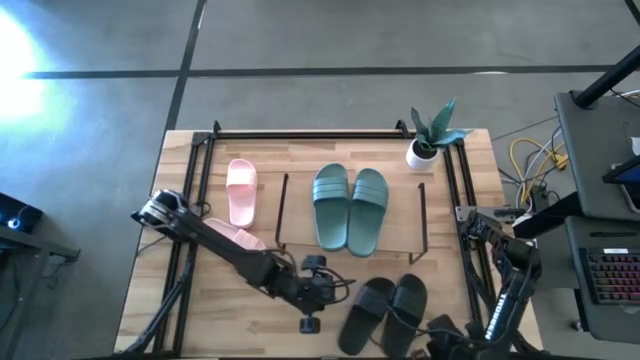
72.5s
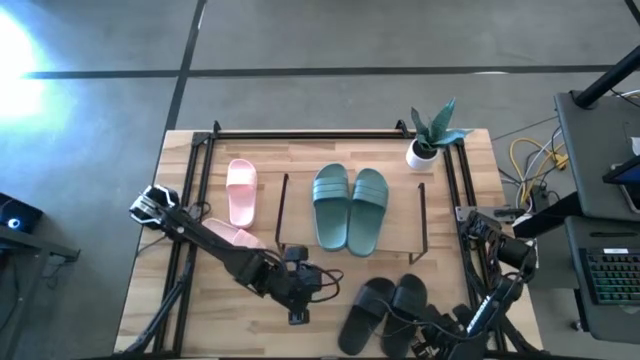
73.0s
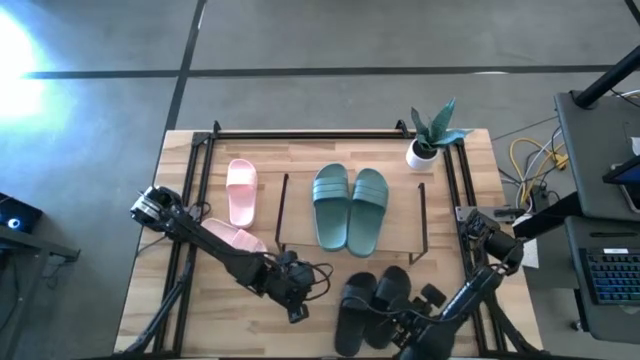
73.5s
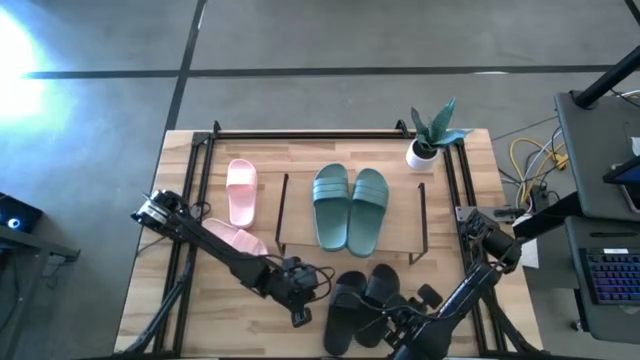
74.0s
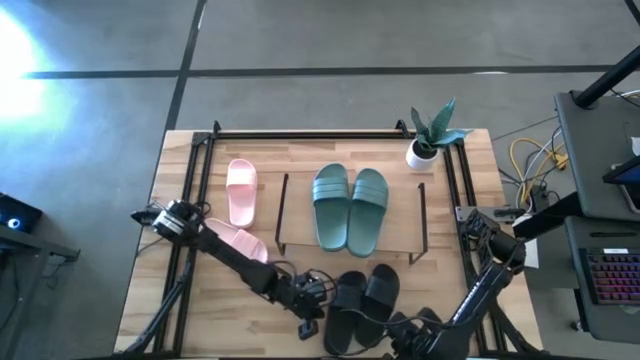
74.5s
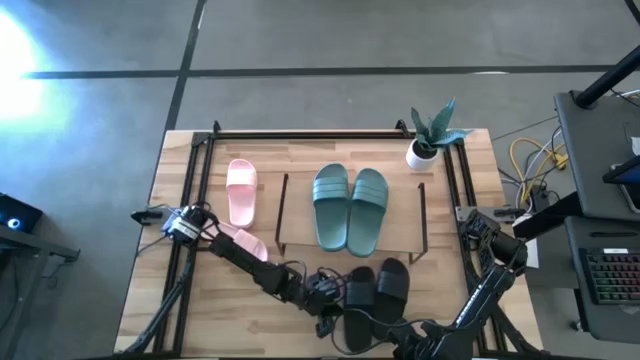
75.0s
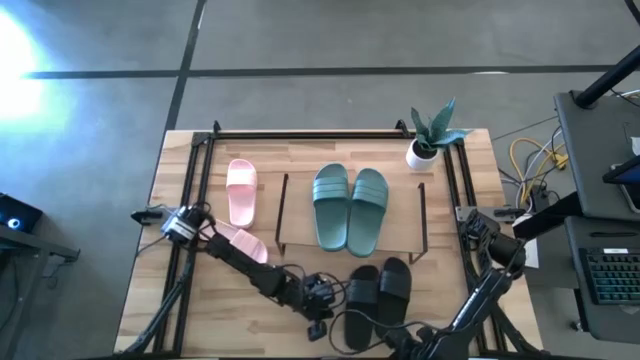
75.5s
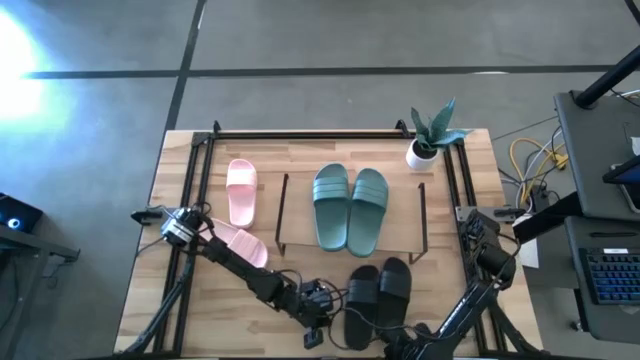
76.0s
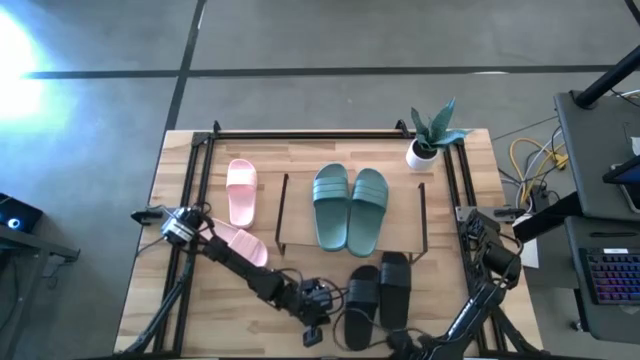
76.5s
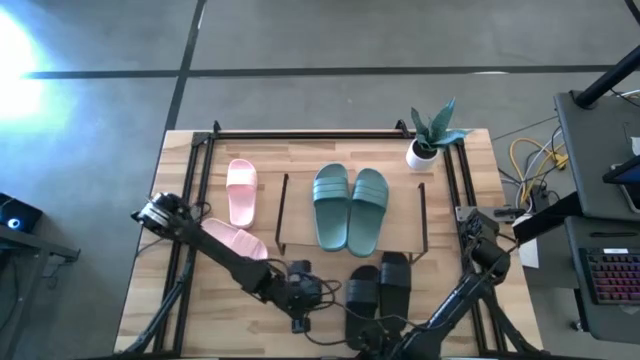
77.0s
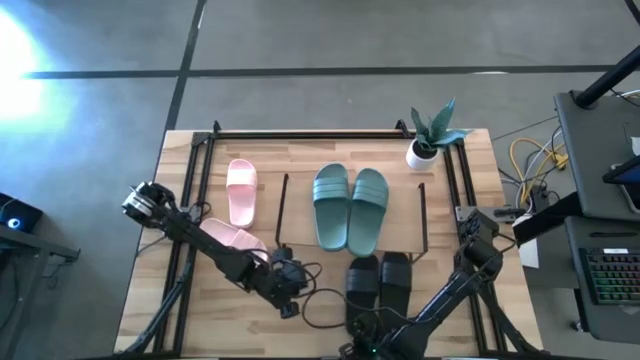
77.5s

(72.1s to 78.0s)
Task: Pick and place slides into the shelf
Adjust the black slides under the shelf

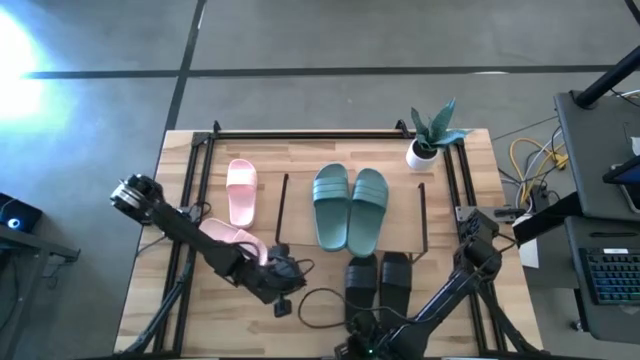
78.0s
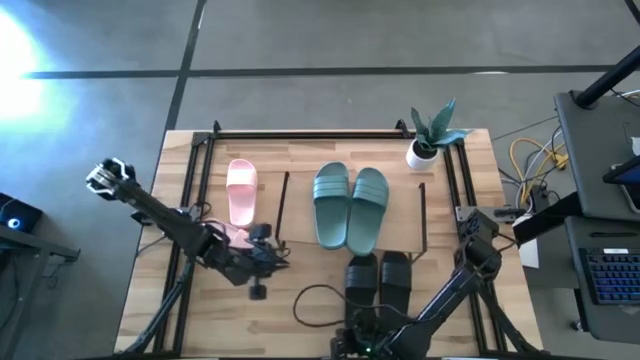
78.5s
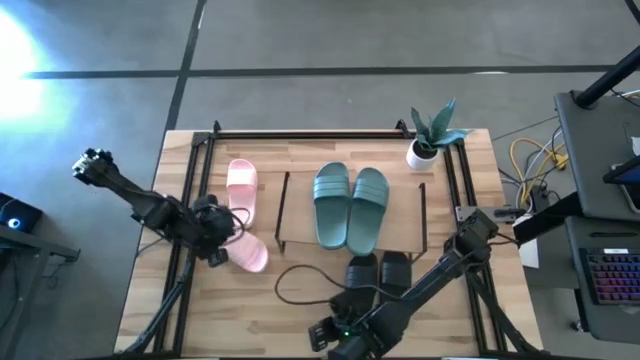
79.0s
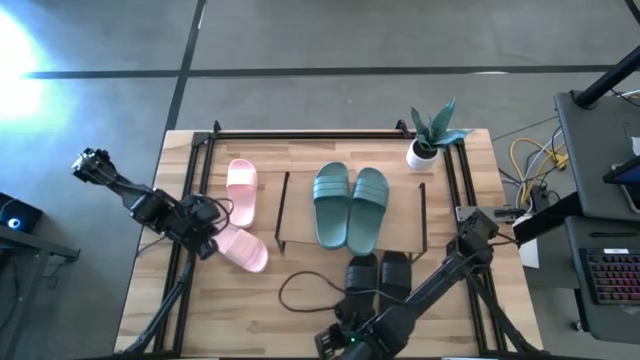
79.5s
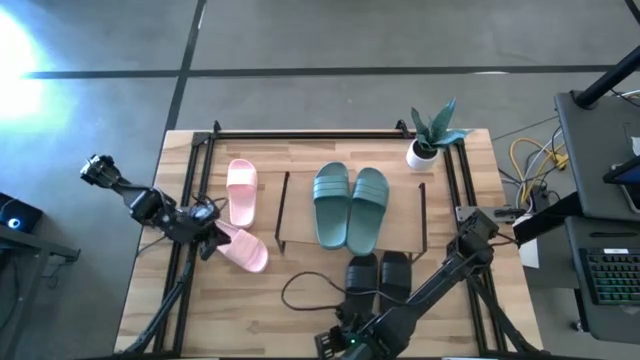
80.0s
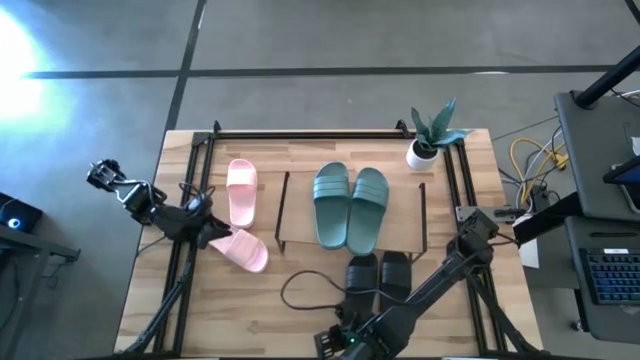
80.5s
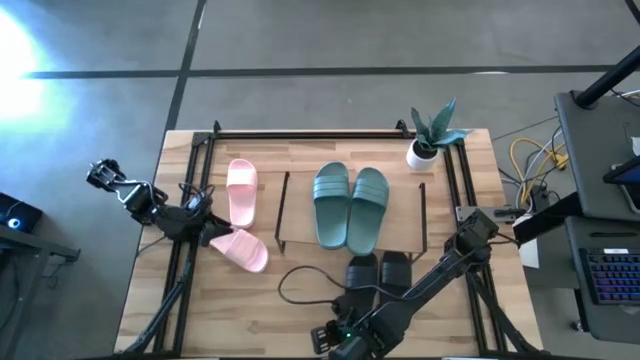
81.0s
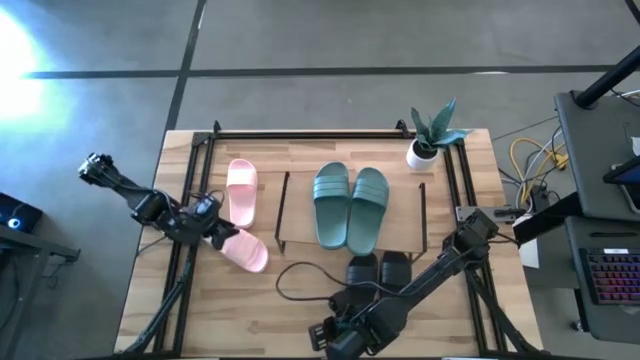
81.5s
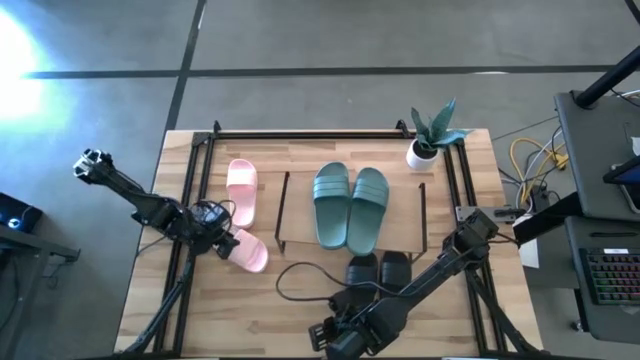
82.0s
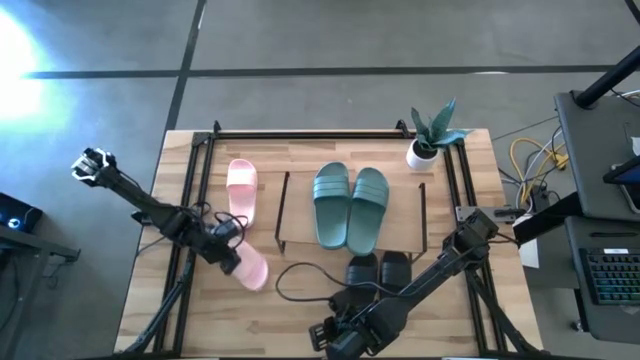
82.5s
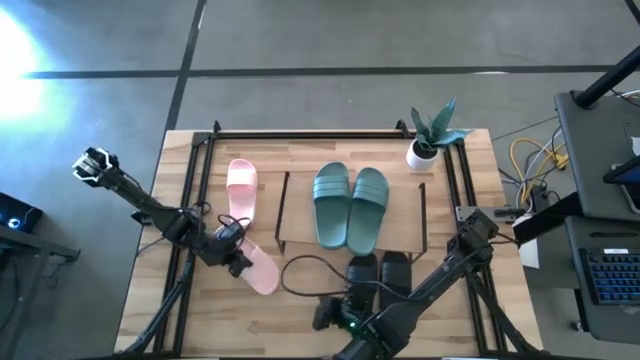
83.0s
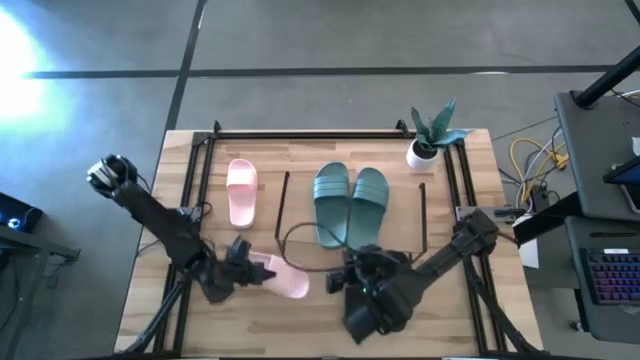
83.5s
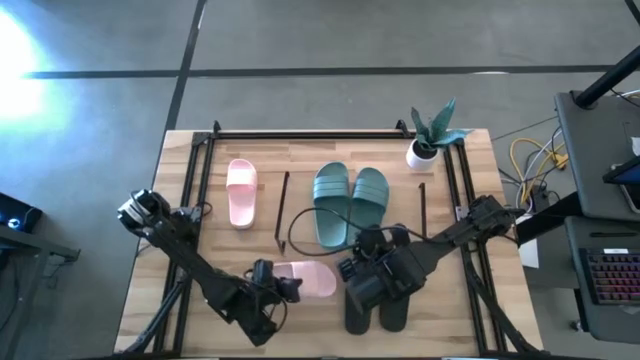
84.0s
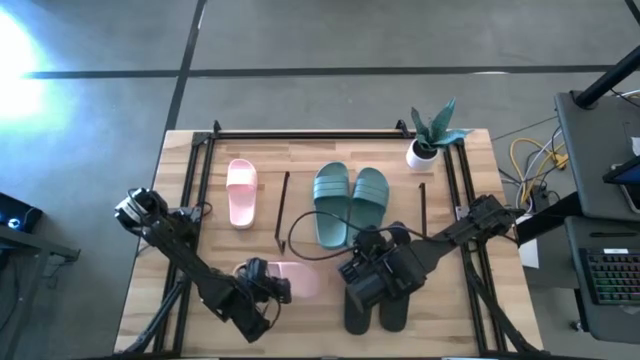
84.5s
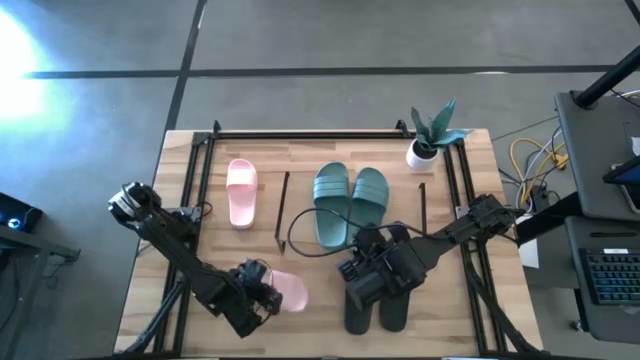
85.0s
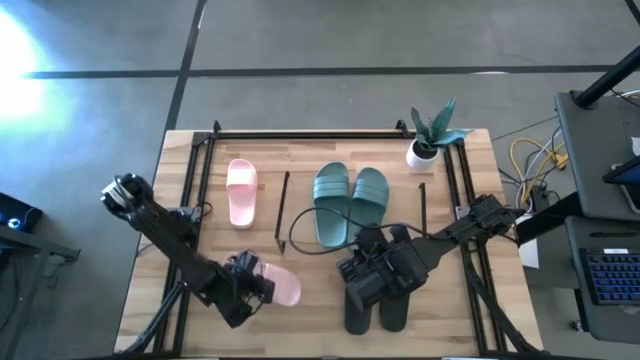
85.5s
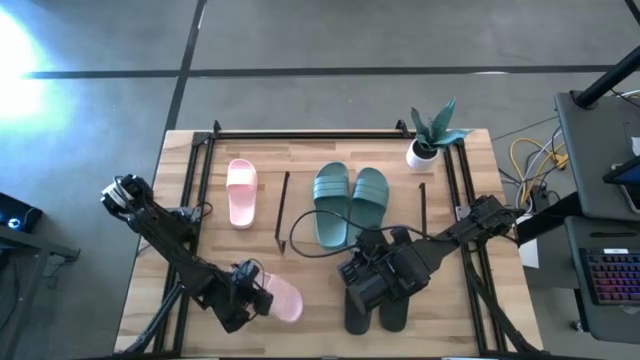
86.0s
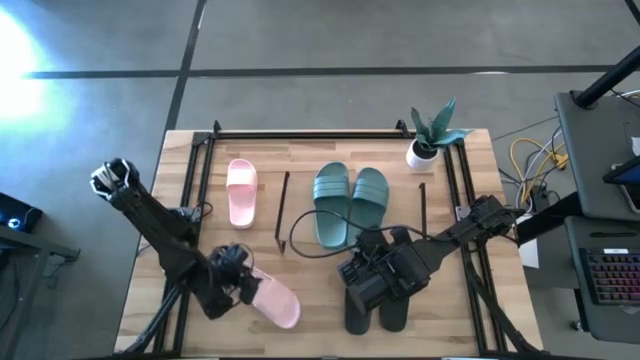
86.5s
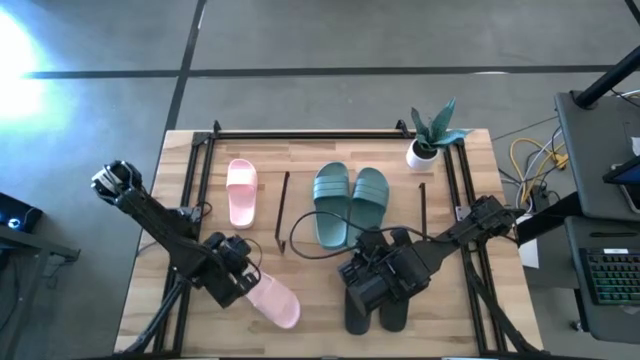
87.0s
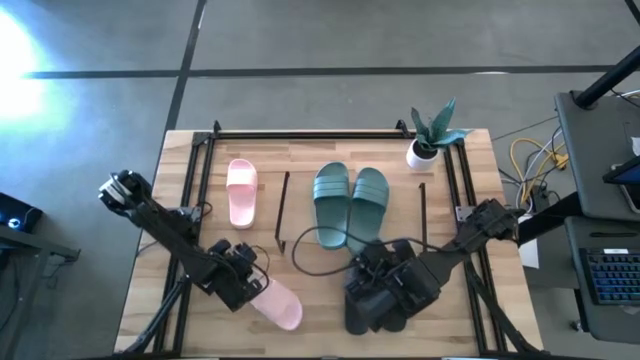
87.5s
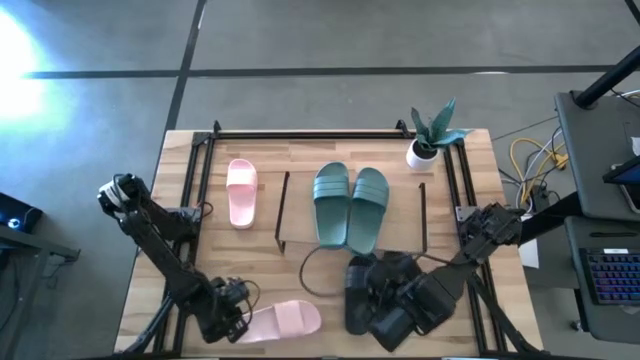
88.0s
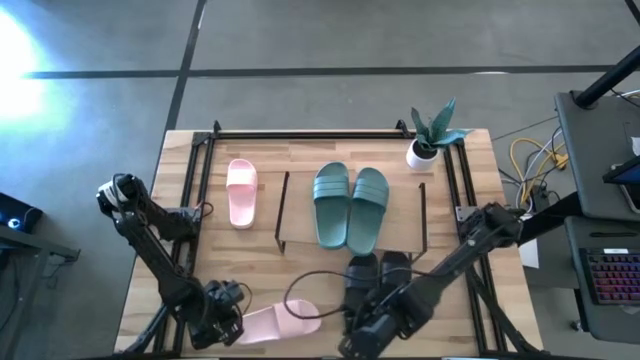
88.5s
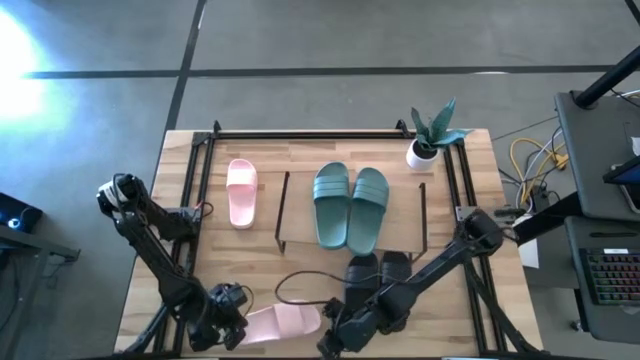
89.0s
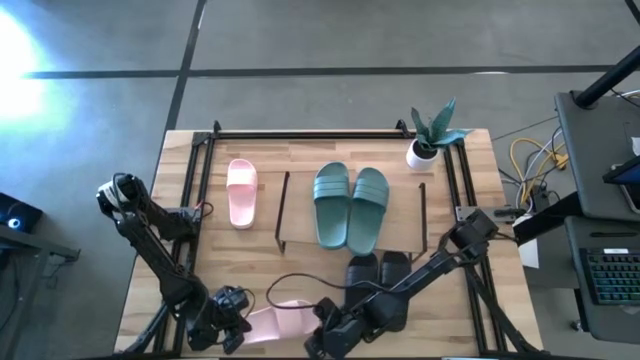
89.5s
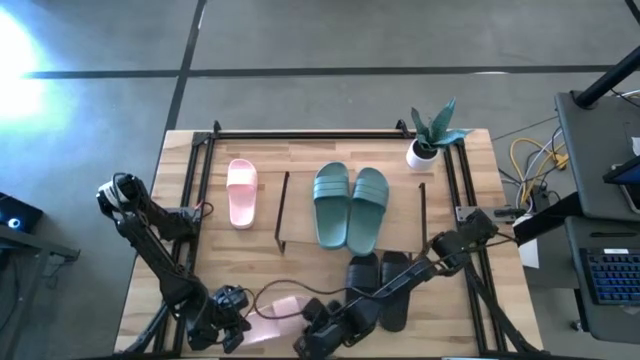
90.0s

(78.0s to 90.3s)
Put the bottom pink slide under the shelf

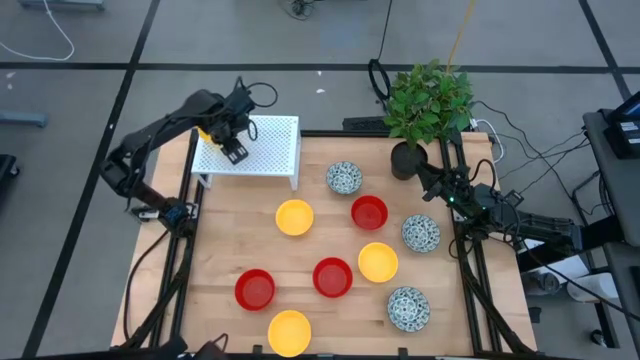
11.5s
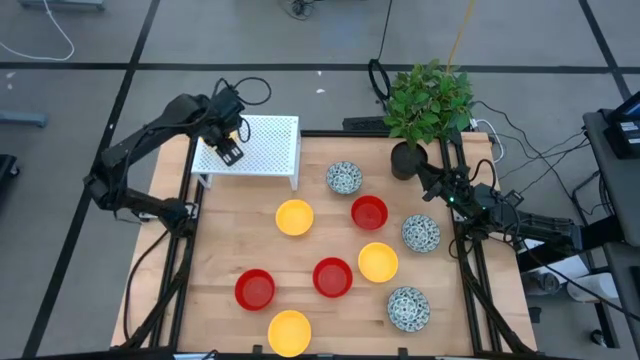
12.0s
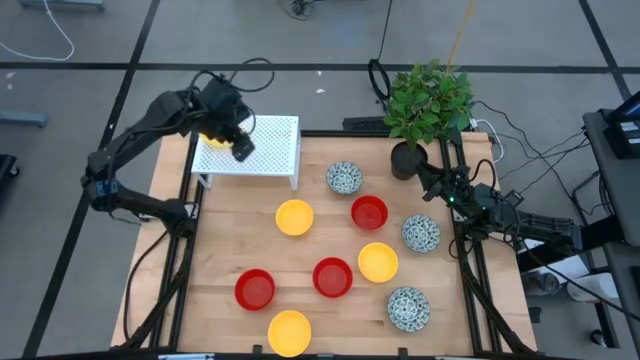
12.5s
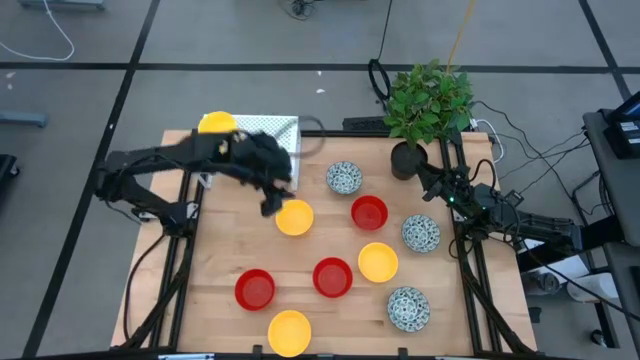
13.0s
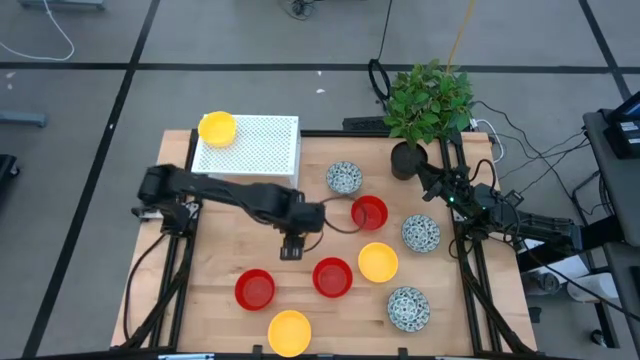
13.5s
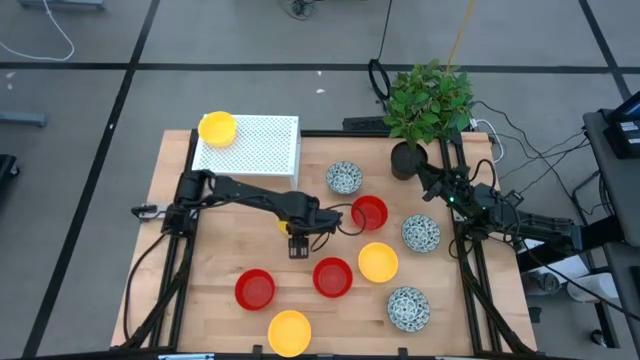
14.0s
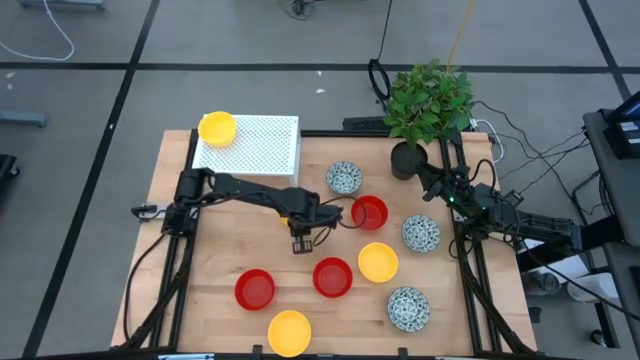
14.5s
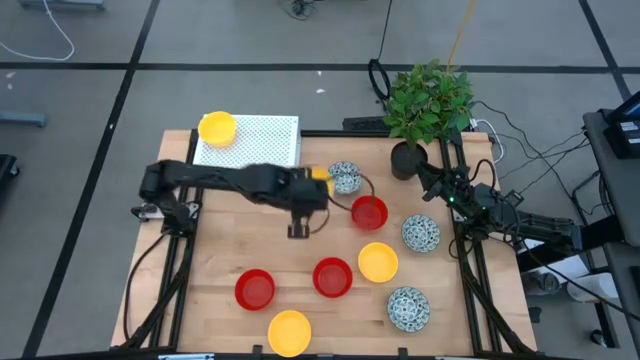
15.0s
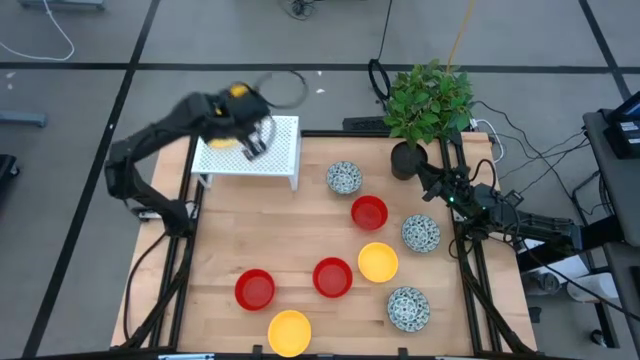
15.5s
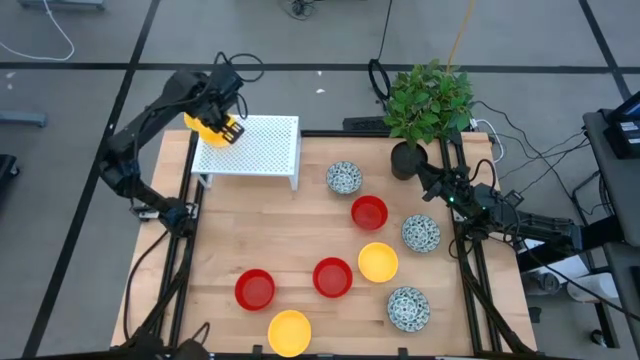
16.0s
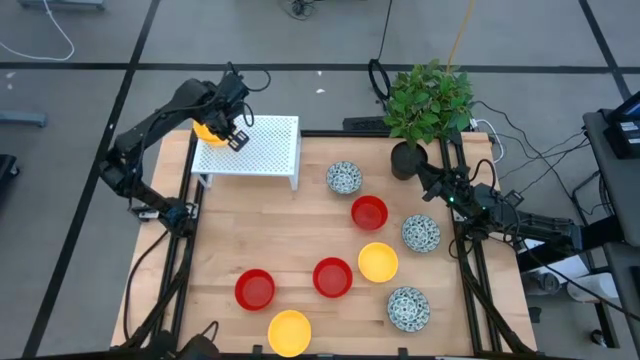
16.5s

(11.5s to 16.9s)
Task: Pick & Place Mini bowls
Stack the yellow bowl on the yellow bowl on the shelf
